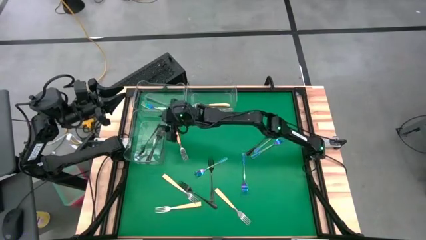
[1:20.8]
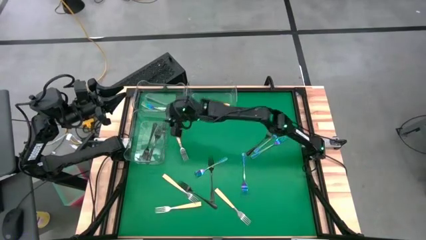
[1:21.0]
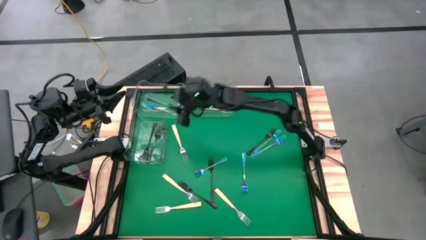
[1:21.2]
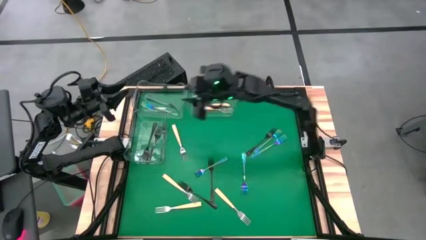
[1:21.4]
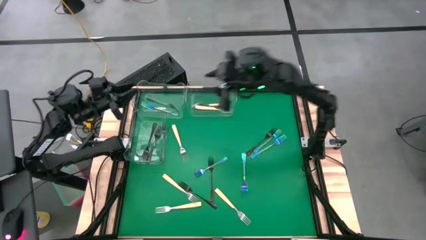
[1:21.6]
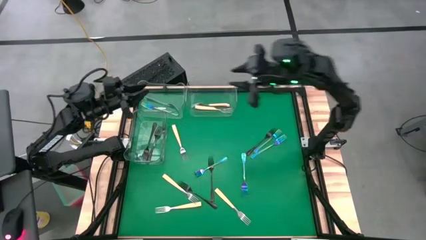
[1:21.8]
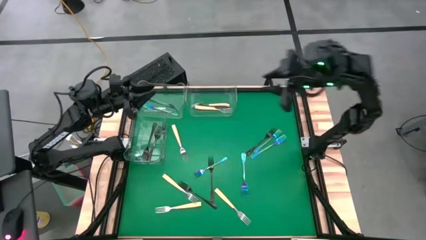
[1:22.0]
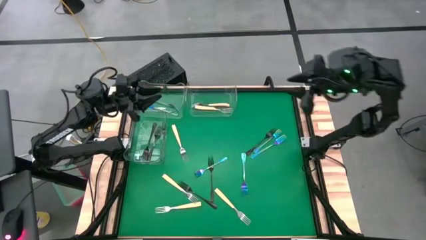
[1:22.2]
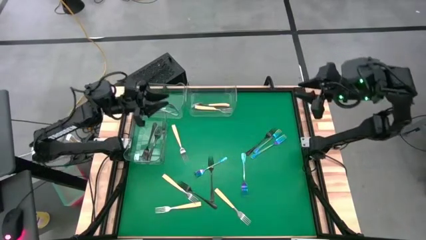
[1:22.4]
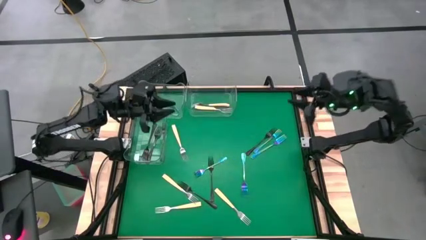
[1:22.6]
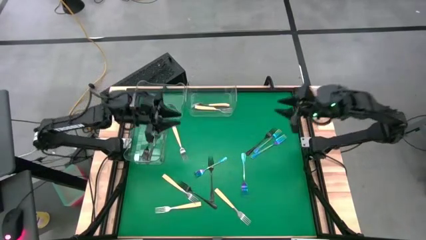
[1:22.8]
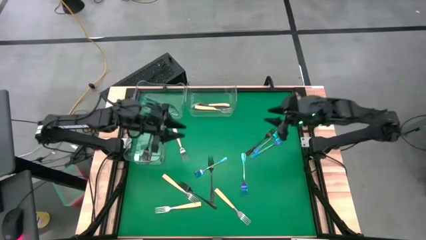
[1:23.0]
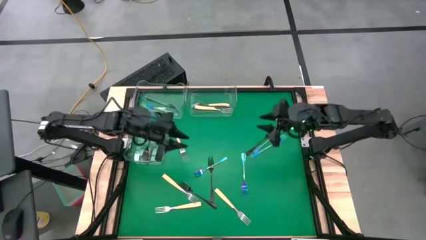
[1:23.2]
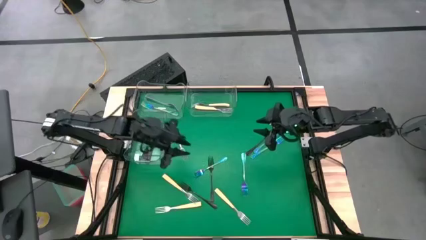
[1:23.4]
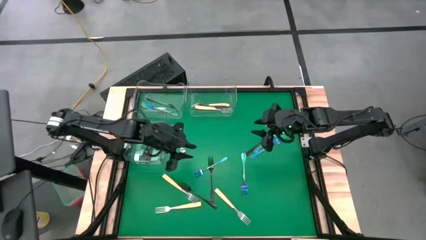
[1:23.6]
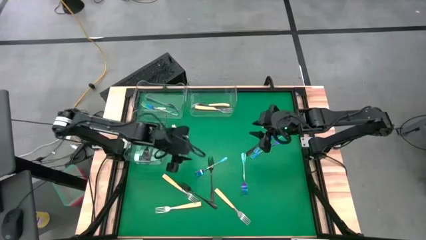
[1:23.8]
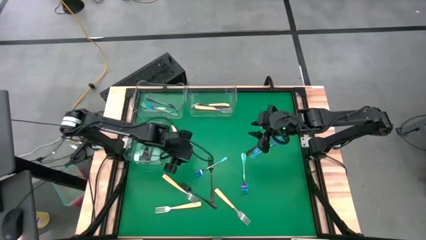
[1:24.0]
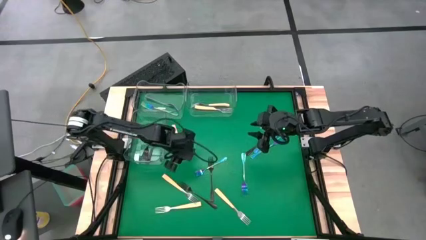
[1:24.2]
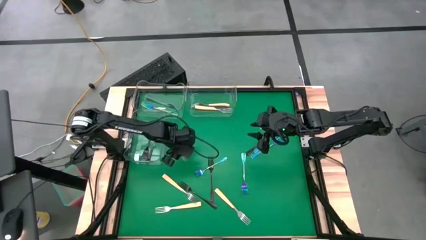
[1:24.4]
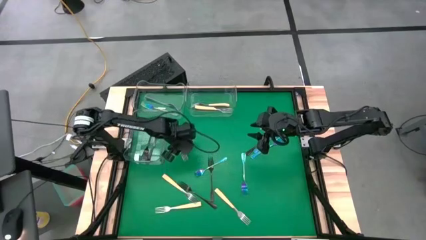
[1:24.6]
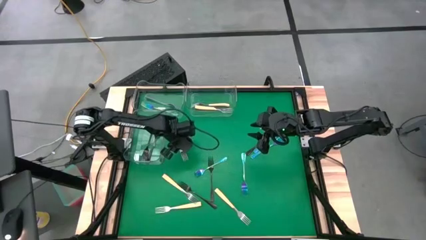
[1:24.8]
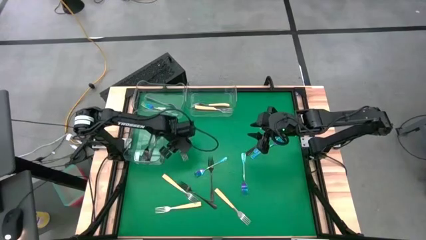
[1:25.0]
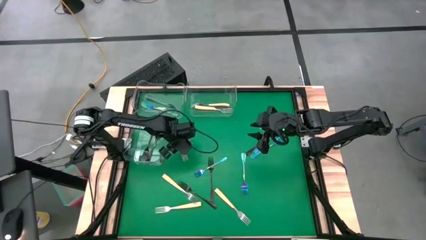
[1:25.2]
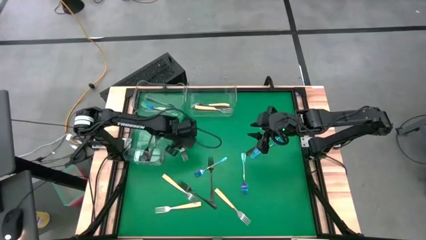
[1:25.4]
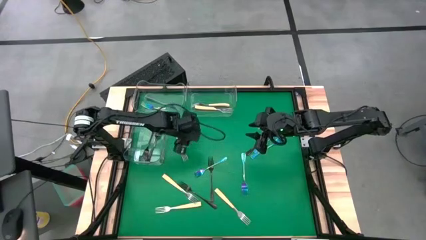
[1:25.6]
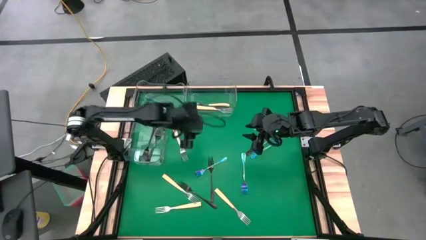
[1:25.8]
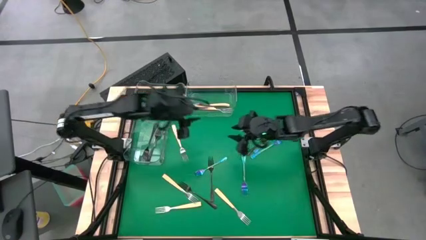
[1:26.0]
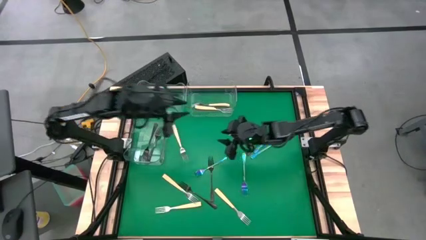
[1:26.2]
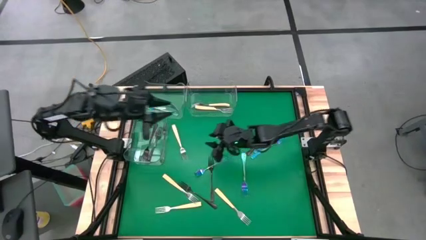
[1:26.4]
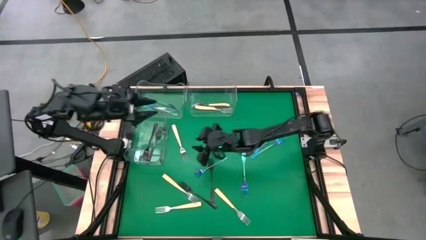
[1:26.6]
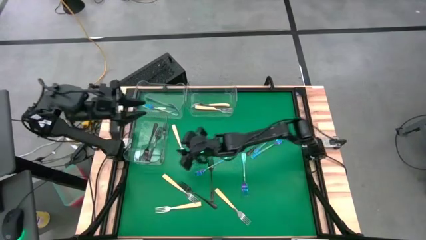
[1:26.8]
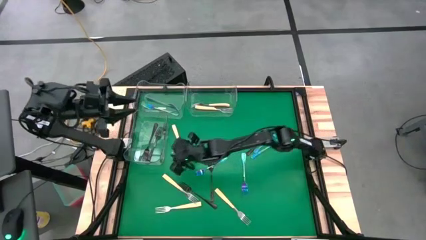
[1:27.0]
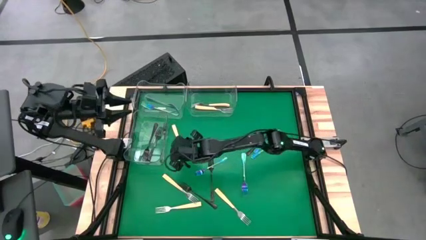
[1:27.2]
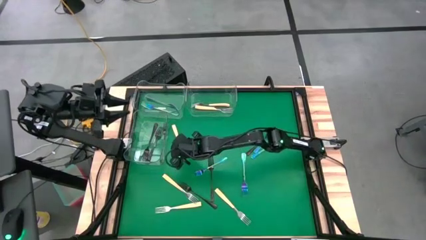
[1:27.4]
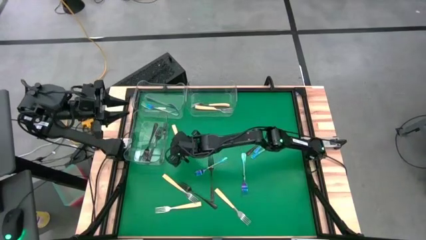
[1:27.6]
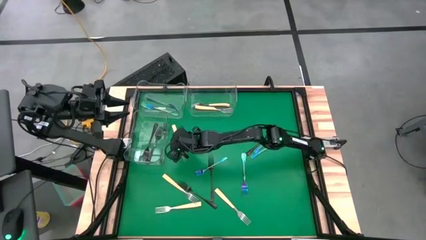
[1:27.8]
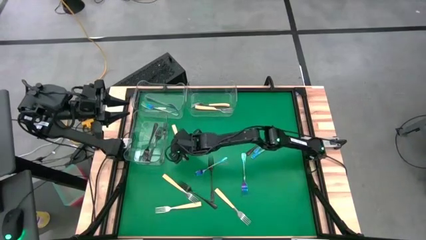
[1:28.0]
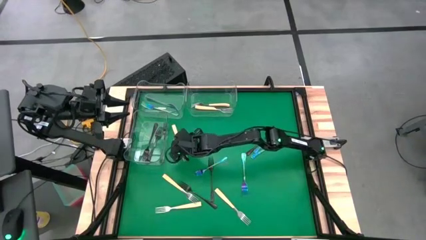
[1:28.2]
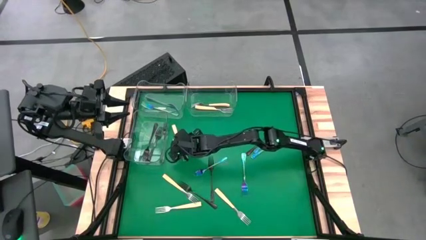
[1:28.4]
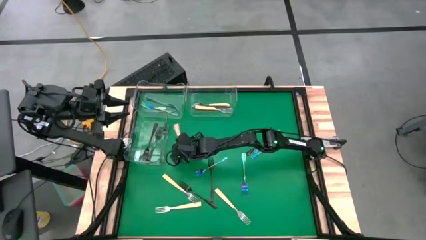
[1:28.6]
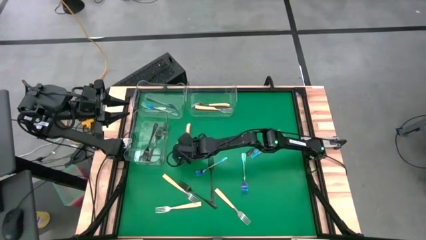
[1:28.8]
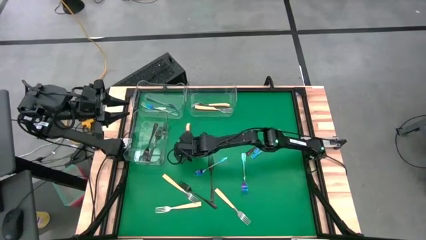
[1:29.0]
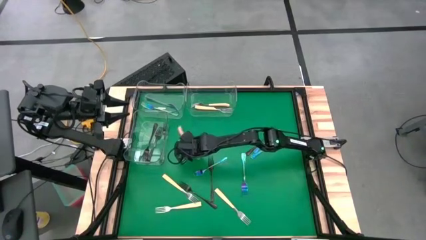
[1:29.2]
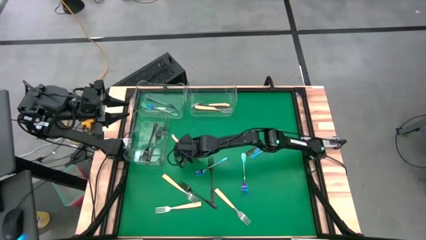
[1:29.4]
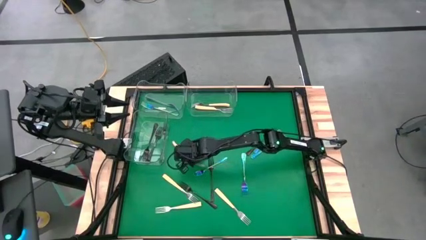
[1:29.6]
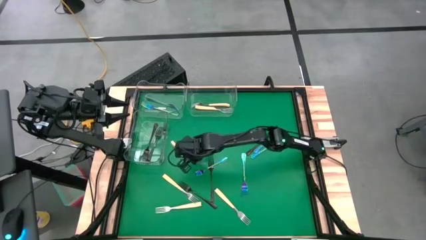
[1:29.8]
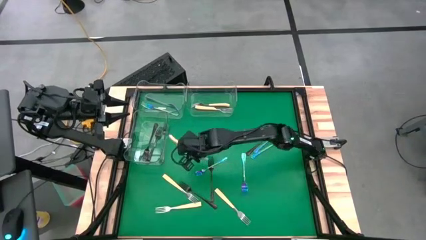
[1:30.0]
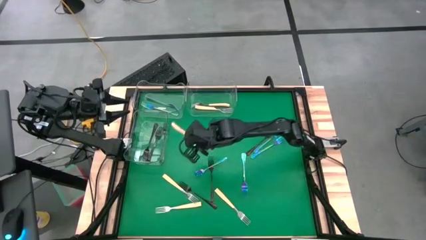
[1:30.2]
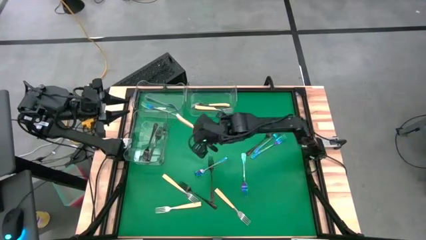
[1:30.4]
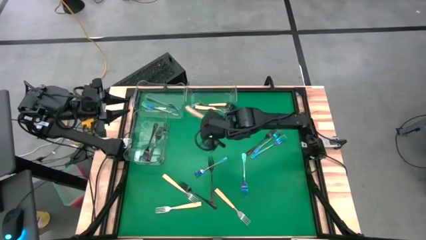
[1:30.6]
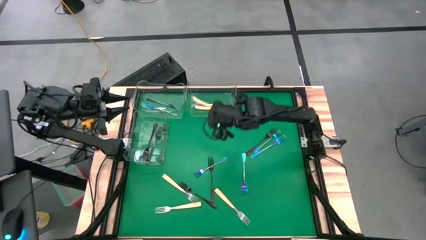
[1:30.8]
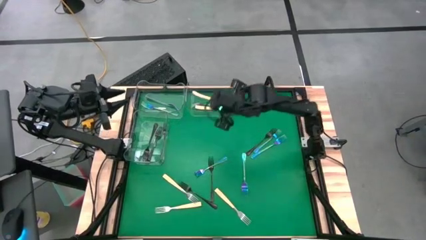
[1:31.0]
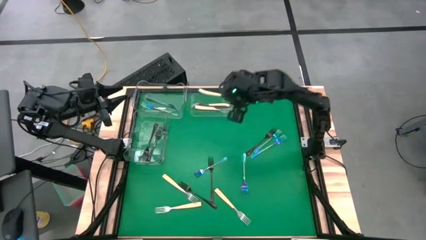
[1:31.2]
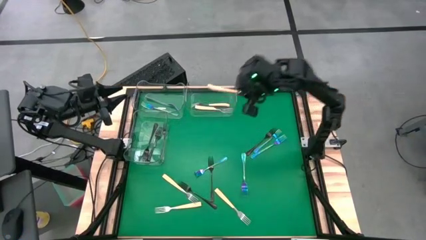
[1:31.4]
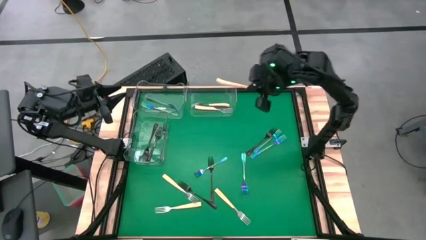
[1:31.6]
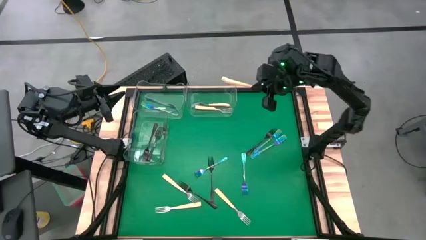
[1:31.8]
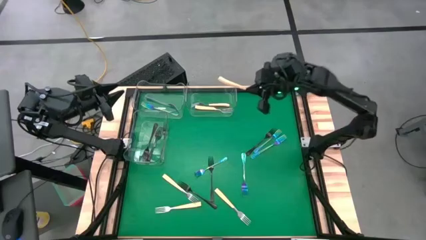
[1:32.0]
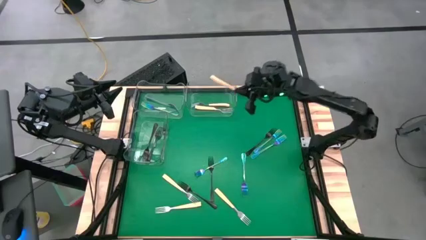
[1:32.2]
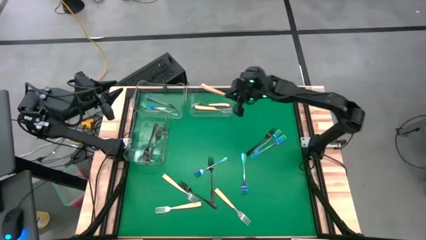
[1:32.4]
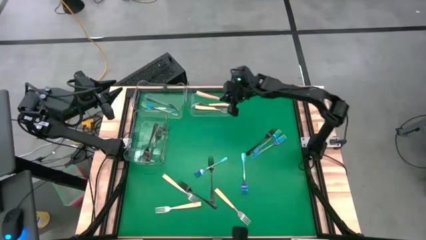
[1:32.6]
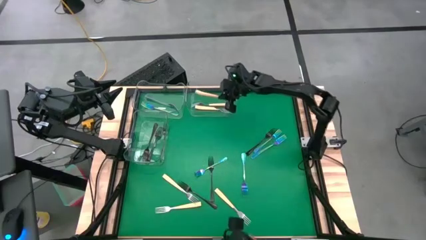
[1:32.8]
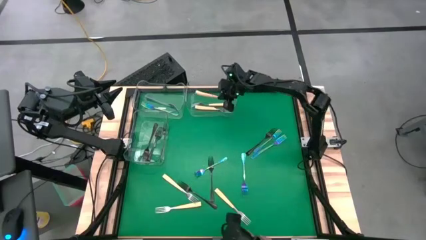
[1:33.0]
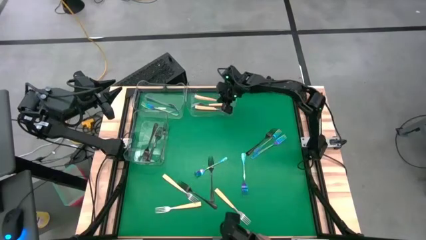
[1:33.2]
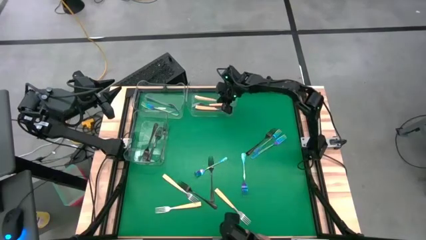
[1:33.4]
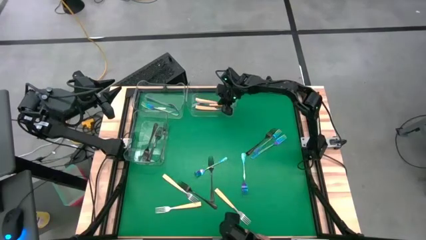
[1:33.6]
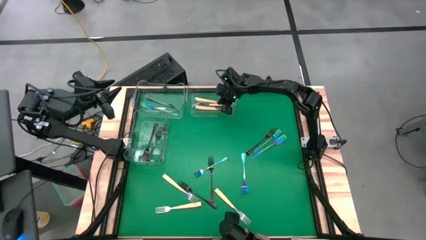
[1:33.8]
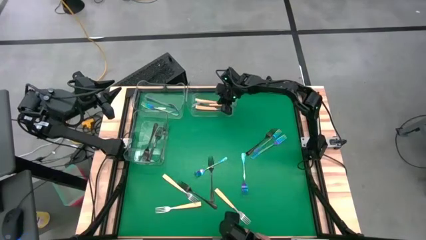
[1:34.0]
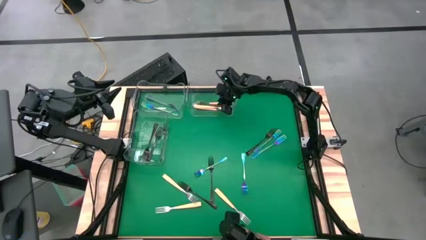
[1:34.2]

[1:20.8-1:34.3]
Task: Sort silverware by color (type)
Put the yellow fork into the top right transparent bin
